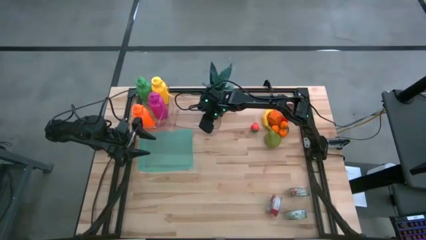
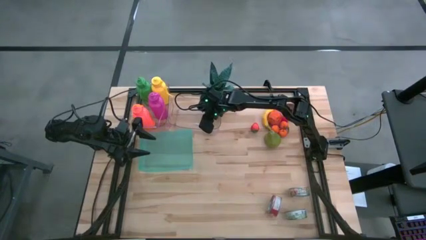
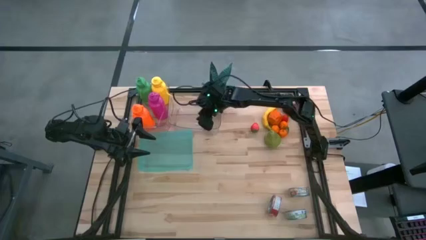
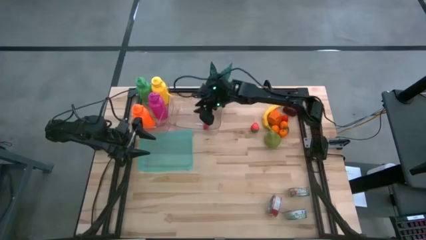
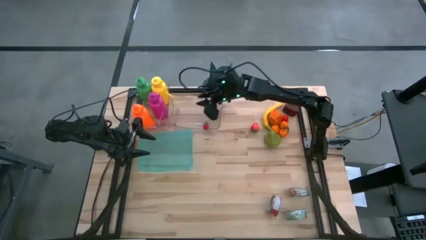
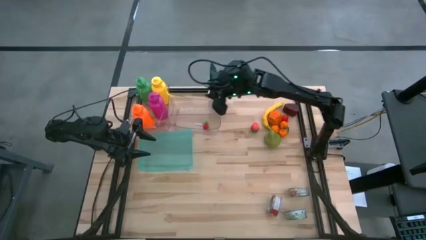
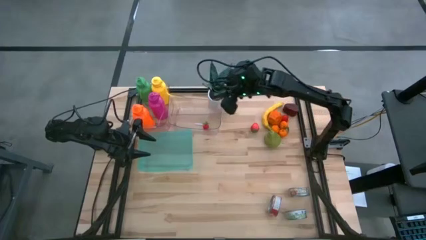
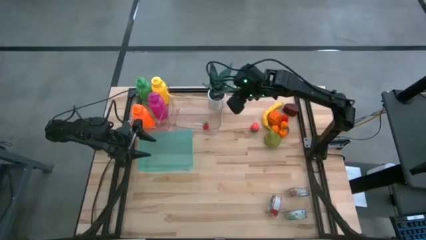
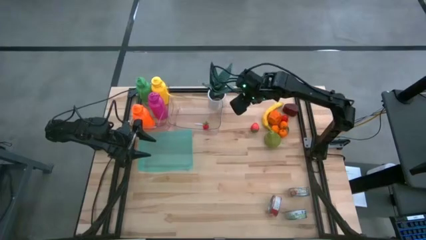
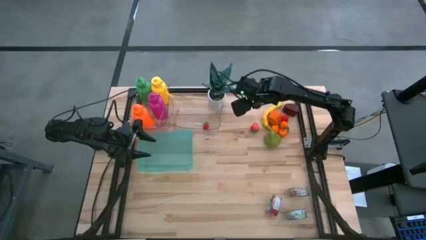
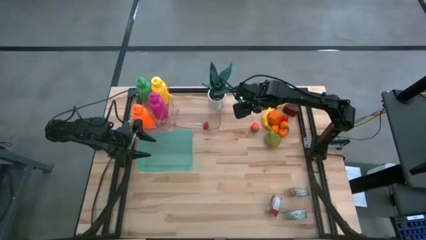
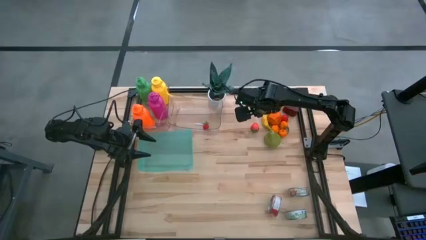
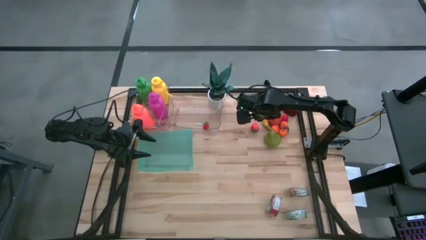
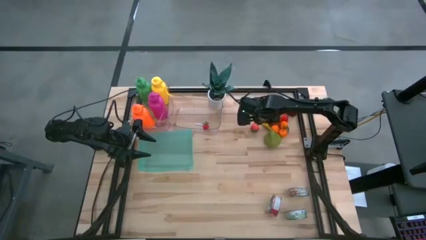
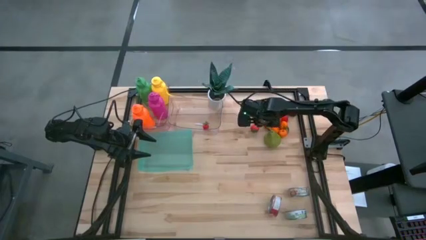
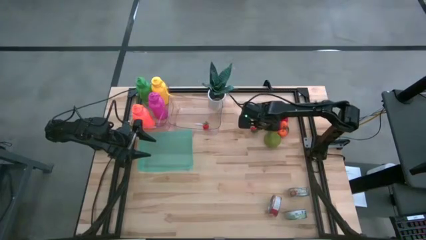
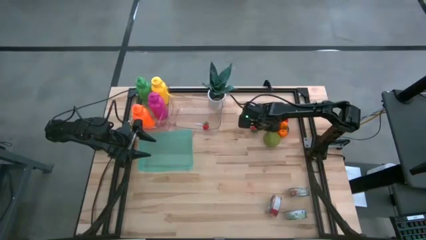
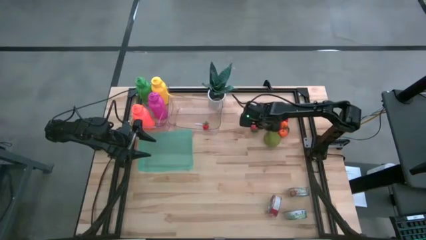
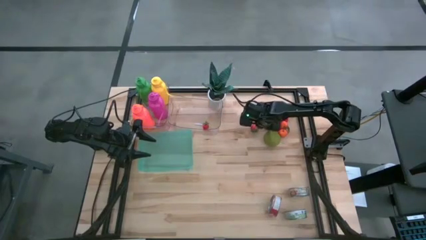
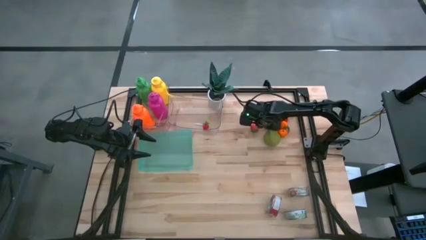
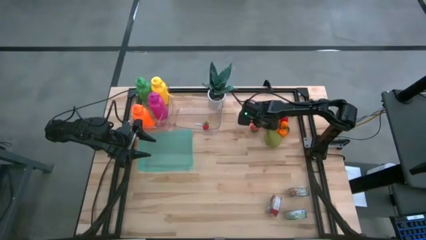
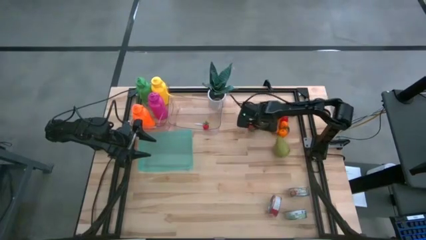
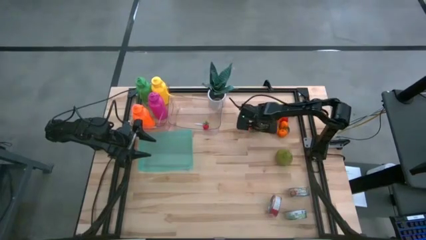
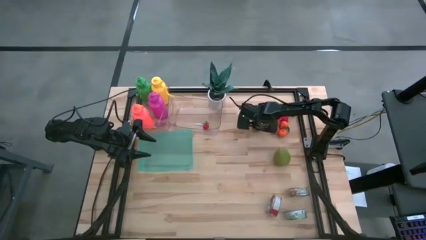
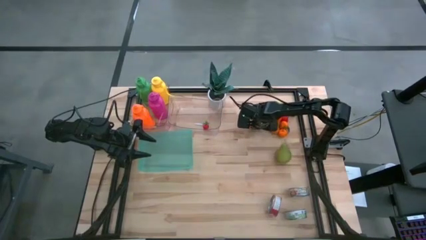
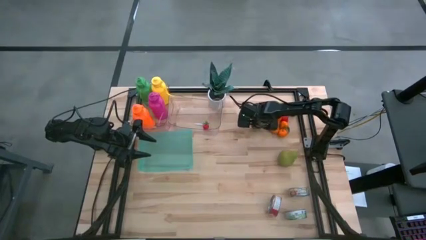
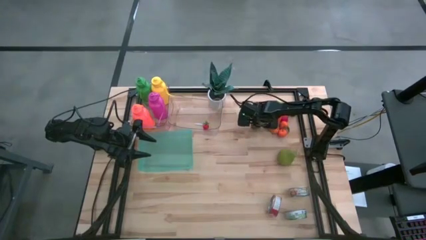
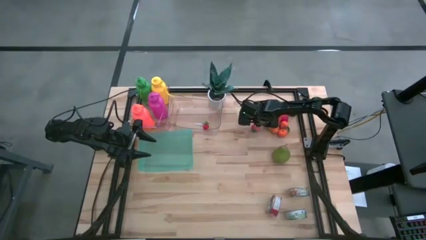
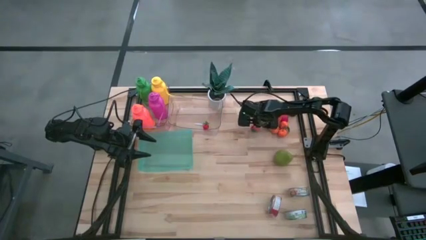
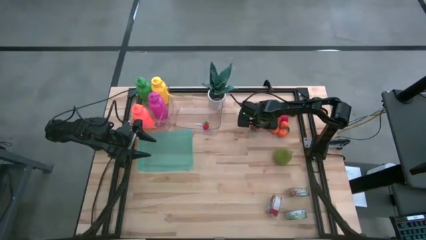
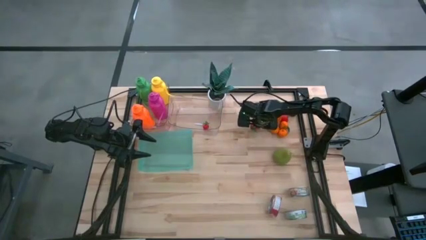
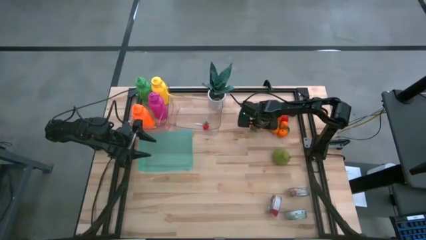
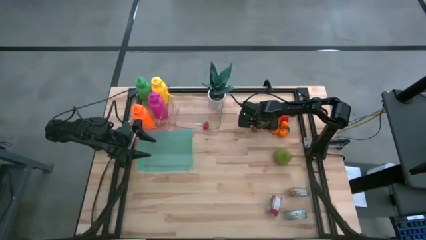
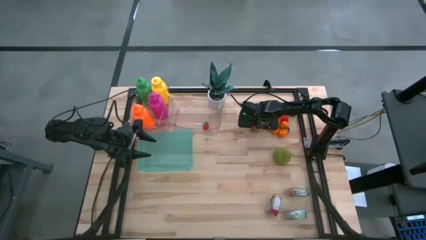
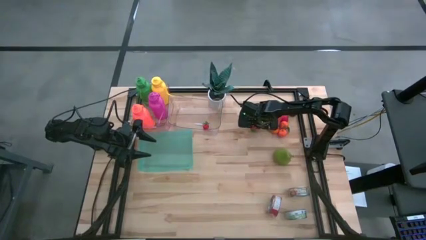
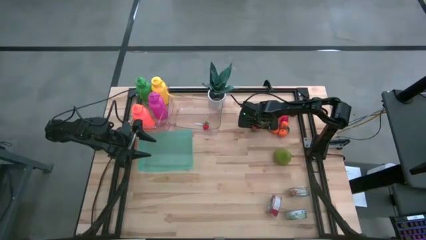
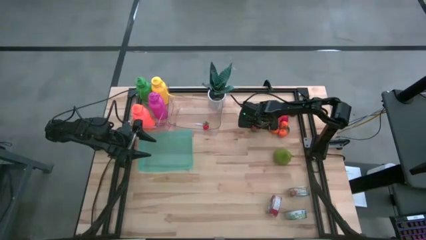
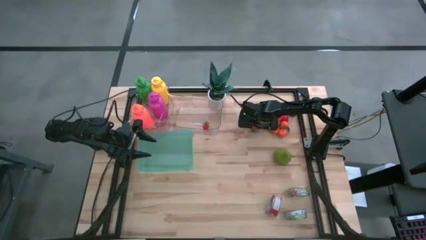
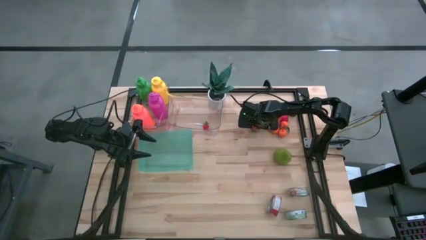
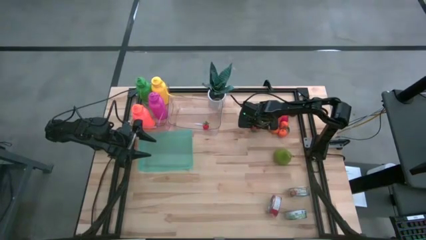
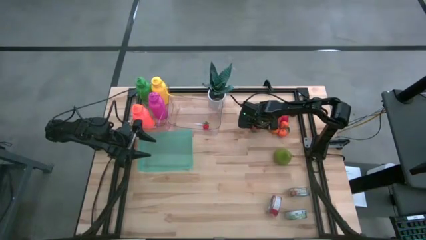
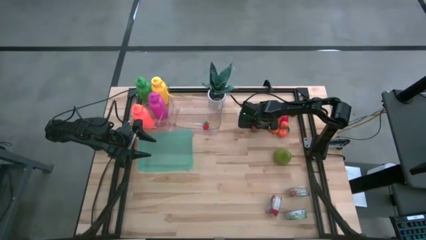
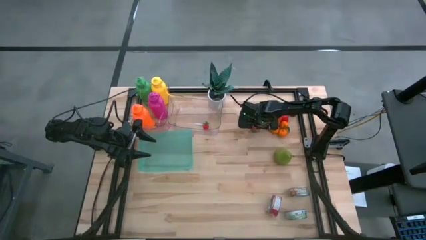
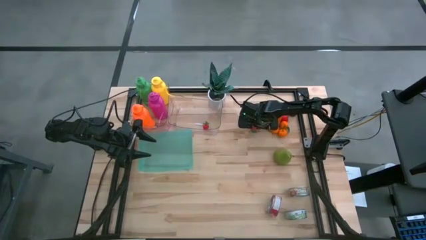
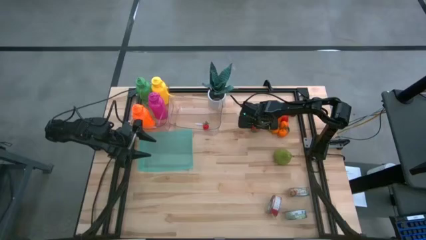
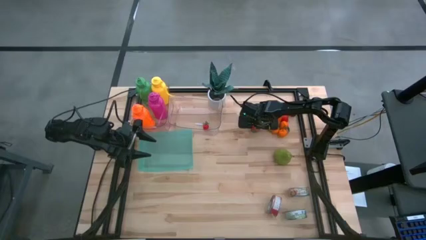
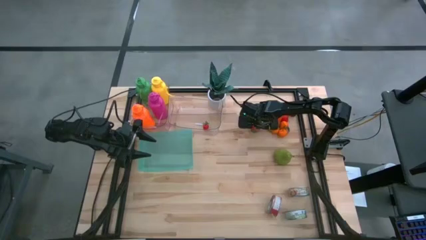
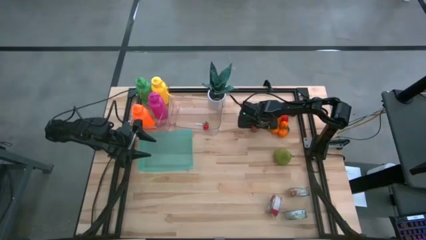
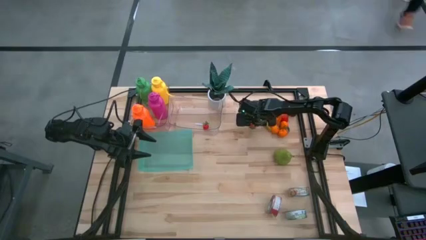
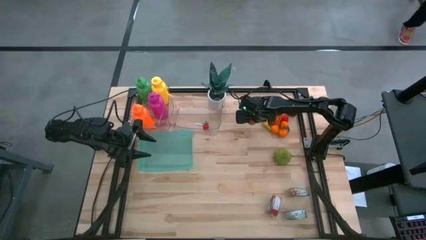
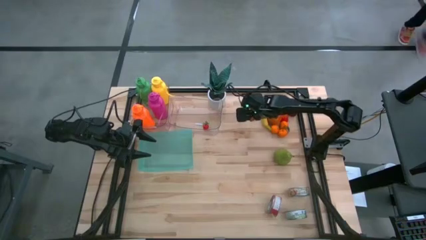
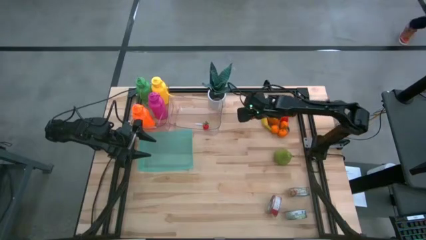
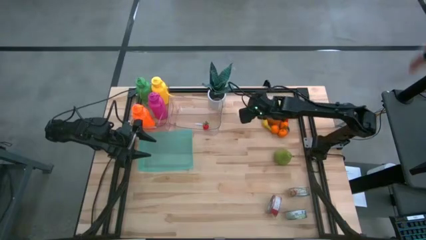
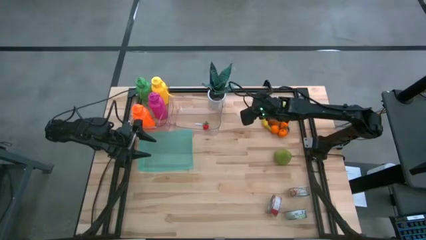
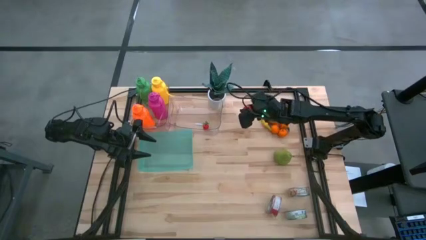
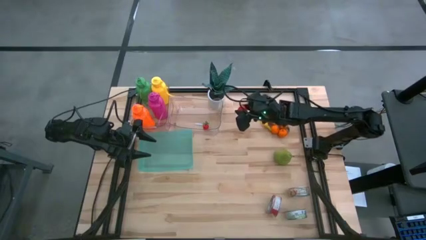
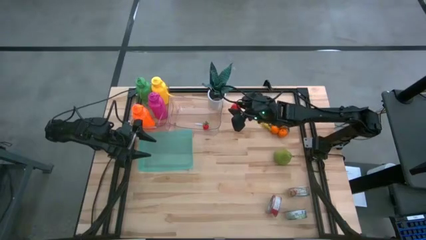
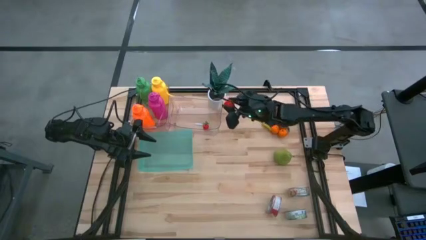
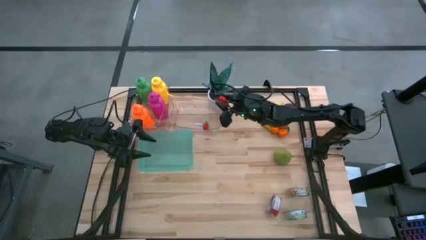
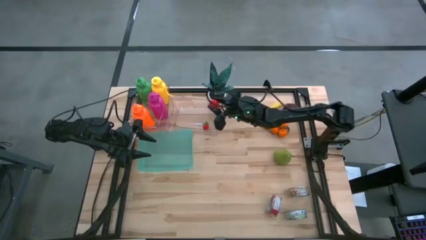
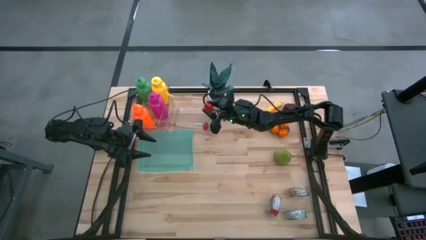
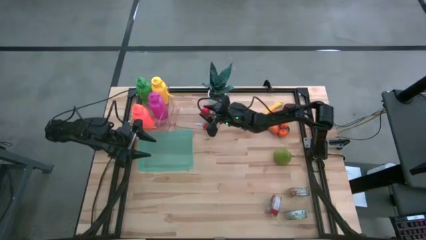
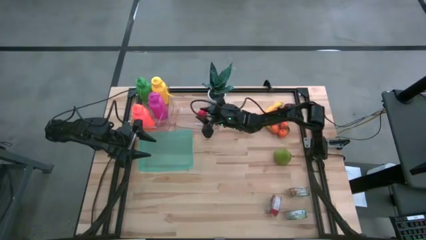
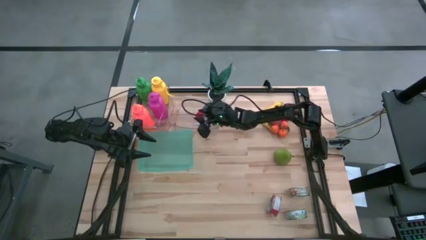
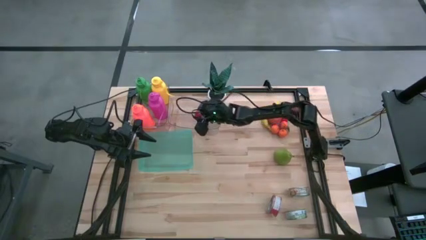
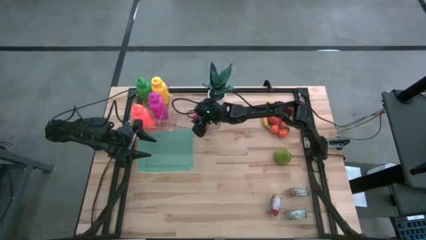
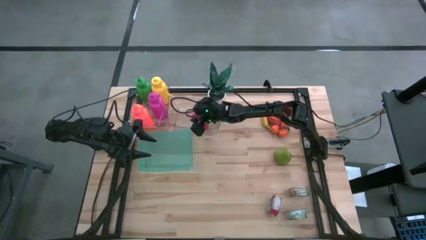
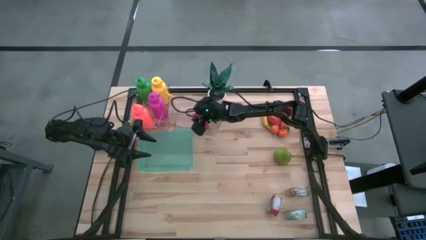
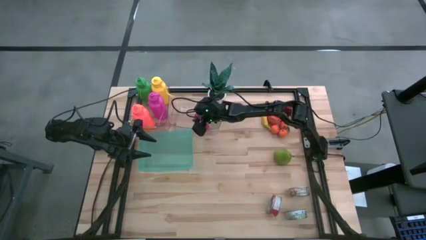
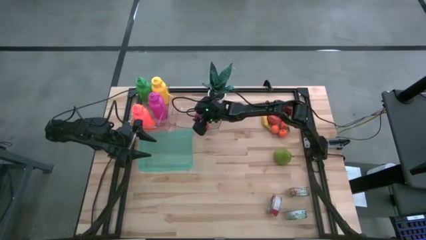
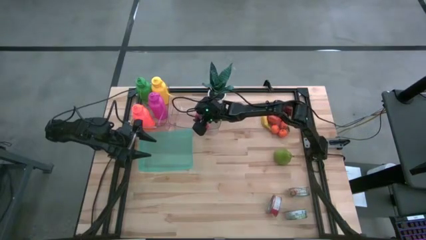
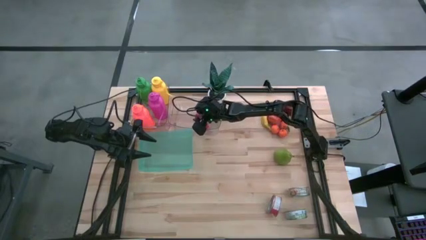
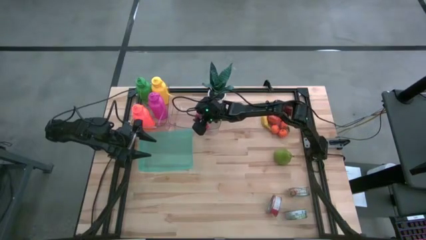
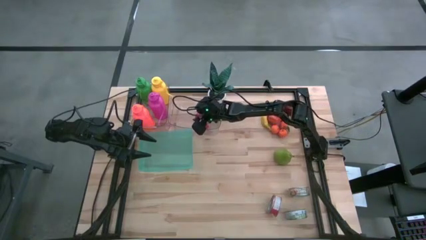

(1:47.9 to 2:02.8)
Task: Pick & Place Food Item
Put the red strawberry into the right transparent bin

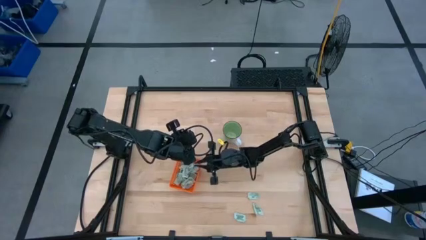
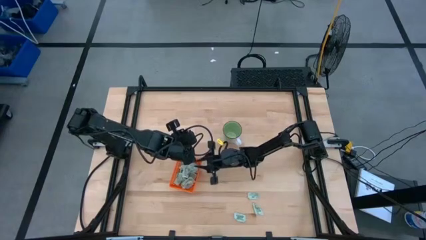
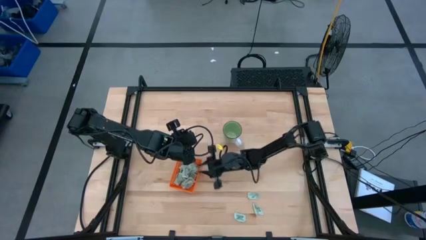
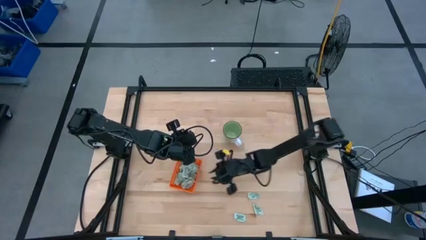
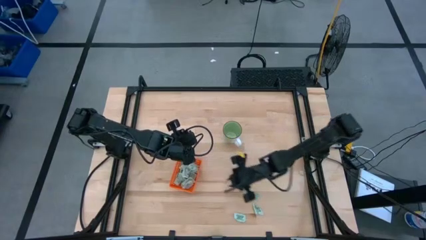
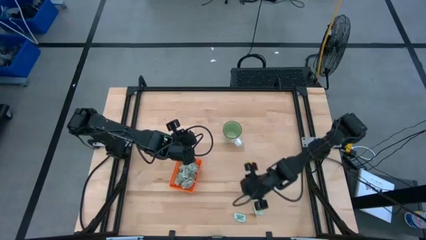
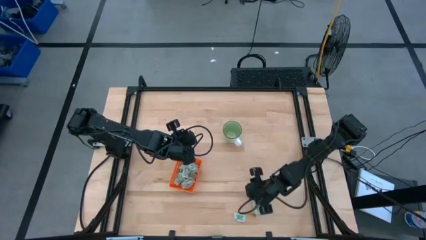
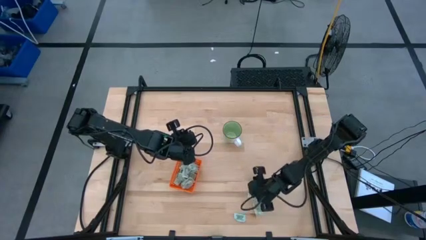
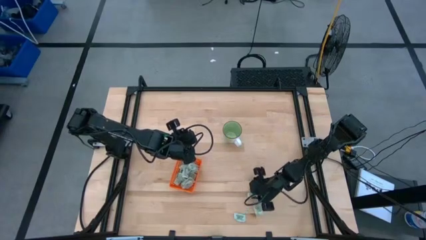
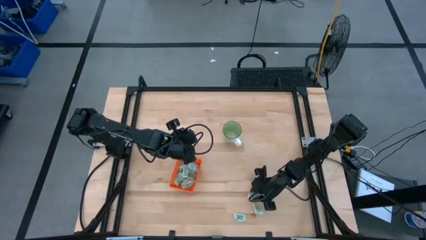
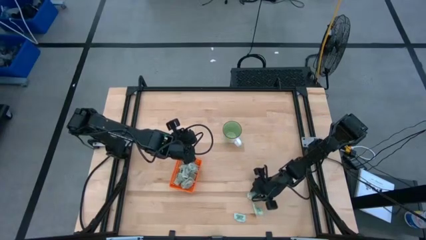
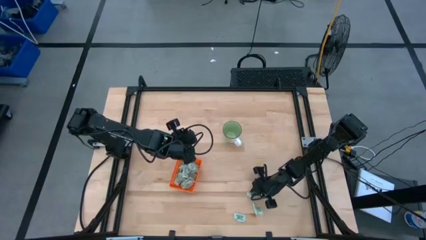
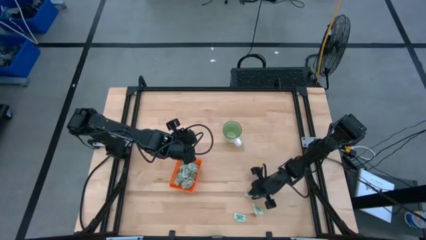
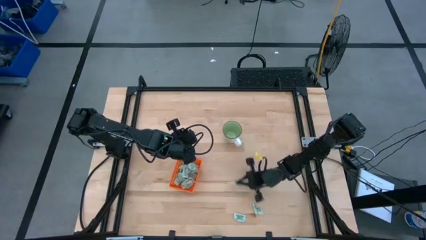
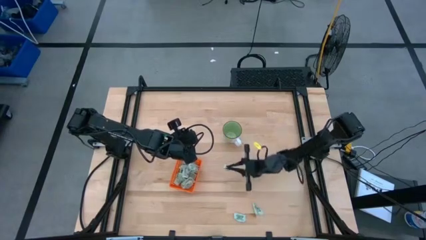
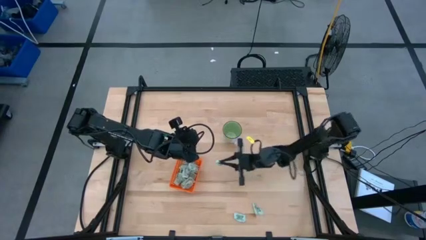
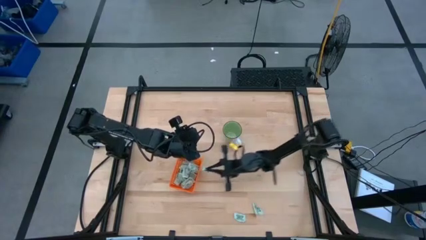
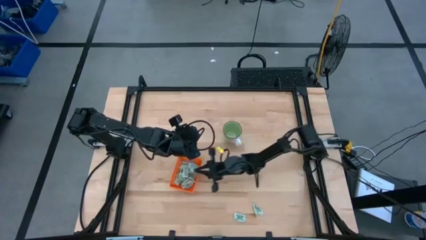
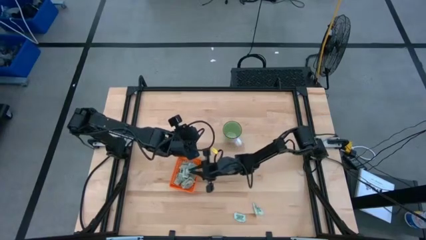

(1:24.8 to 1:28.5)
Task: Pick and place Stevia / Truvia into bins
Put the light green stevia packet into the orange basket
